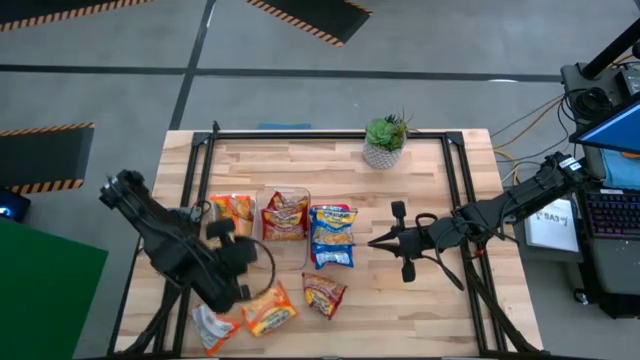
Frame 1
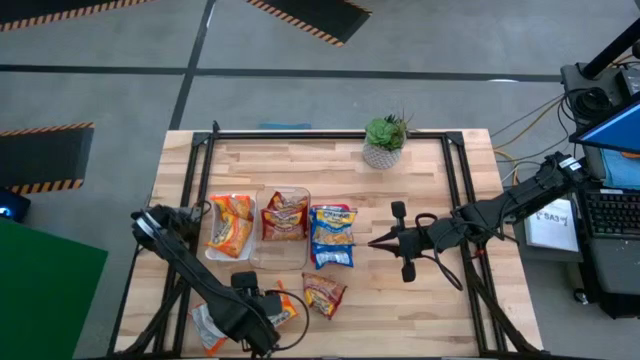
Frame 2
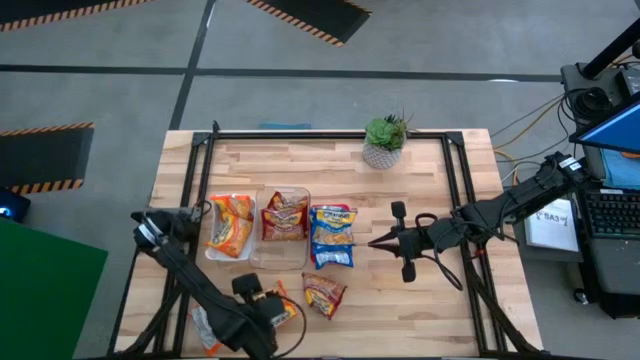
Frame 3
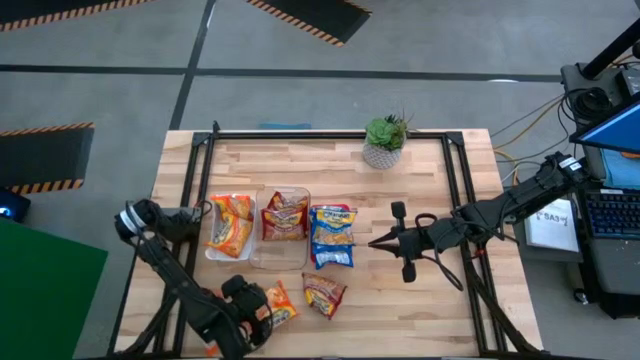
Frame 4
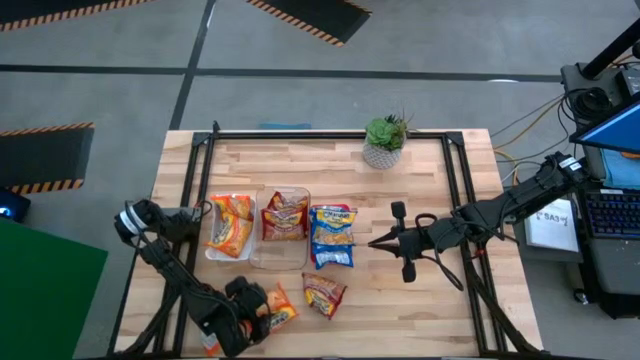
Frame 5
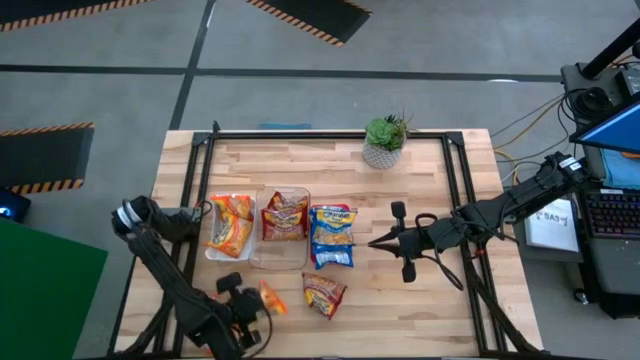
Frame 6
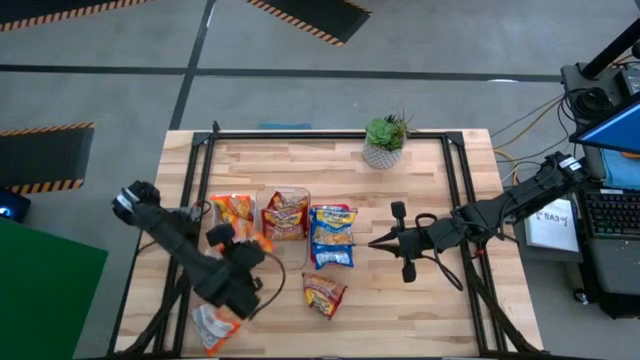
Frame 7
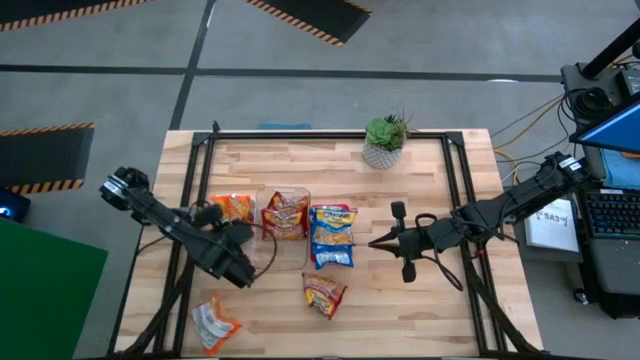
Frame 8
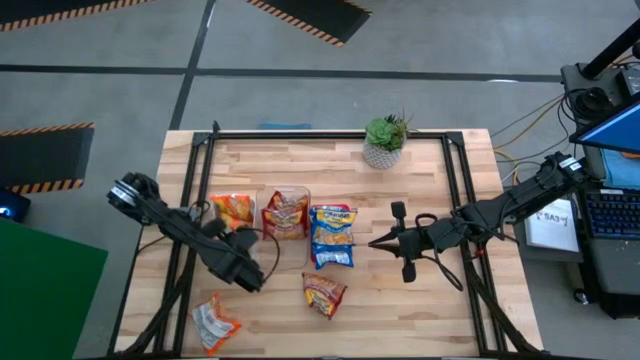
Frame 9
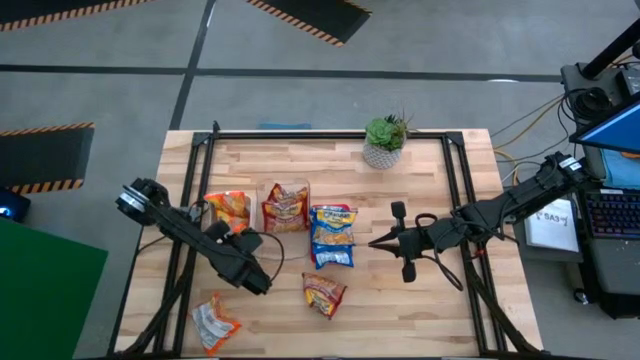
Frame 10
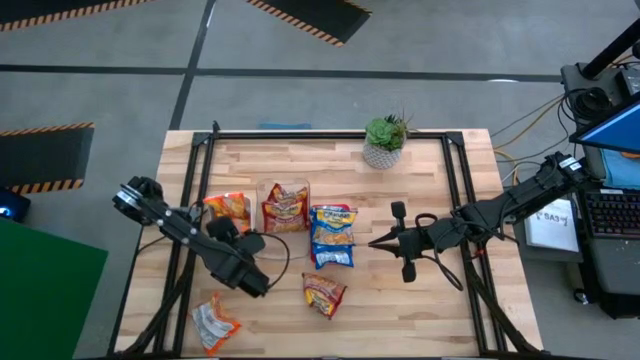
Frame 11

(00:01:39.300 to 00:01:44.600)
Task: Sort Maruchan noodles
Put the orange noodle pack into the white bin

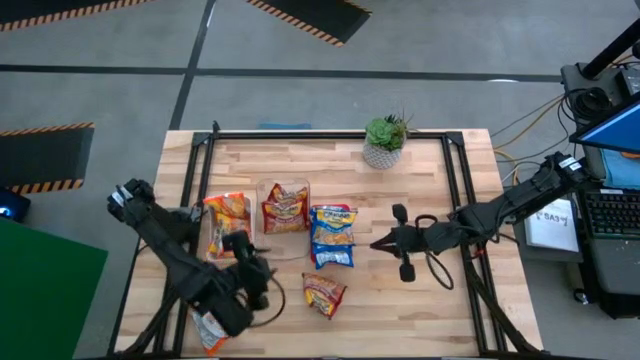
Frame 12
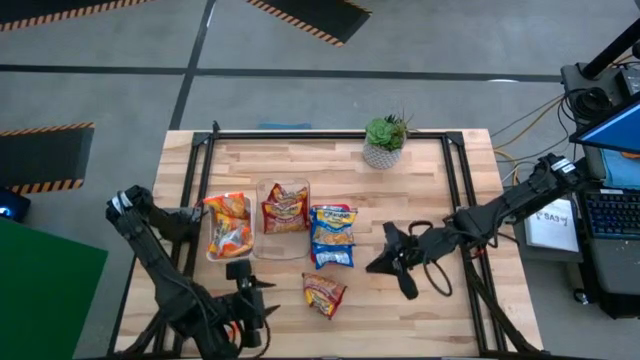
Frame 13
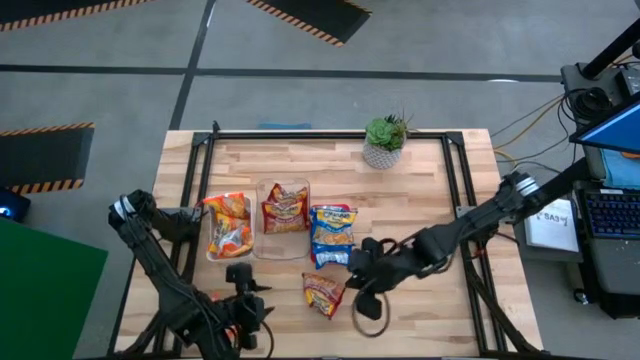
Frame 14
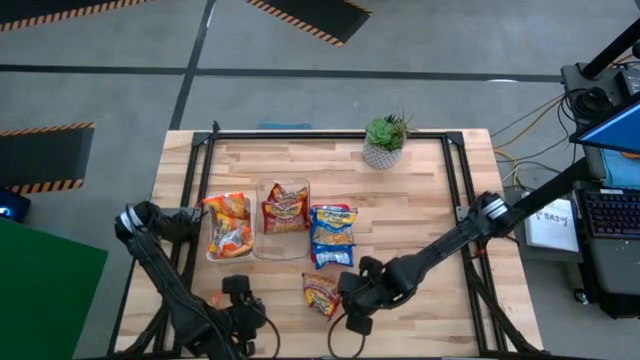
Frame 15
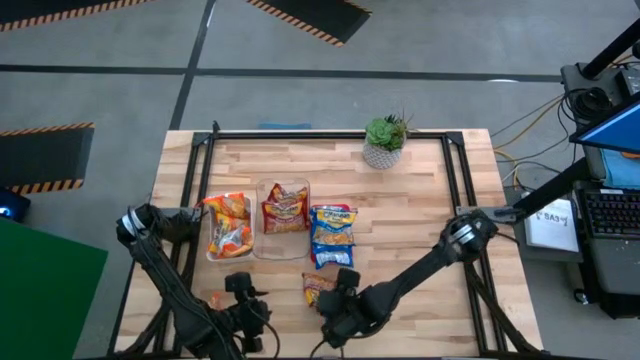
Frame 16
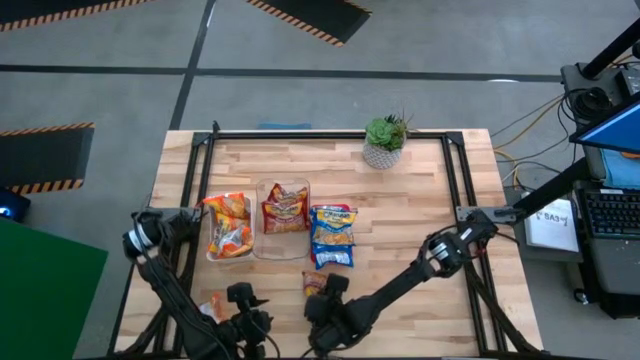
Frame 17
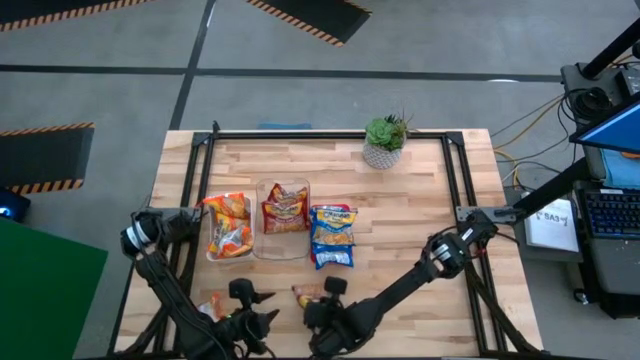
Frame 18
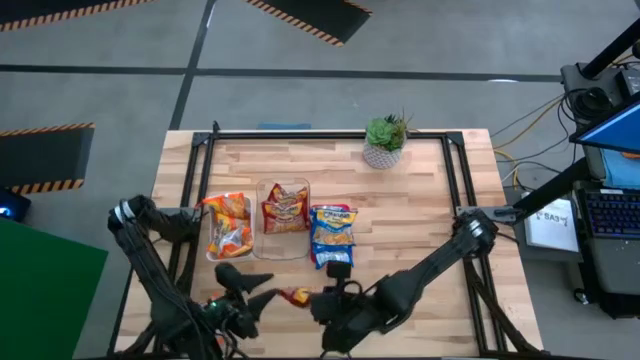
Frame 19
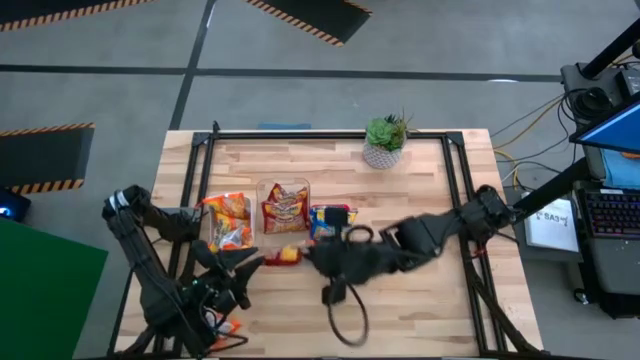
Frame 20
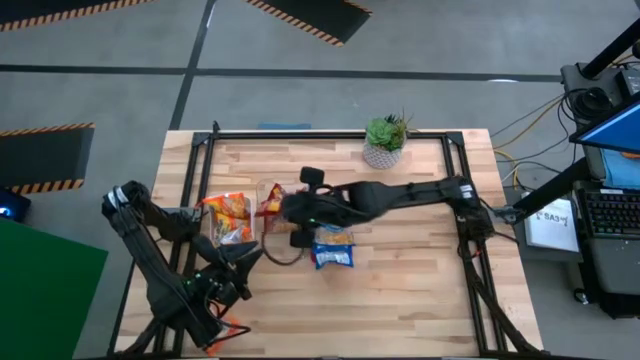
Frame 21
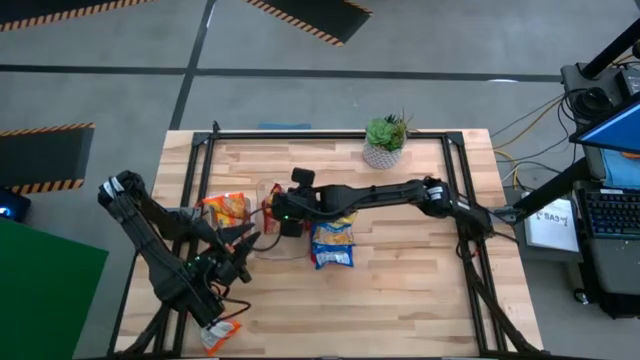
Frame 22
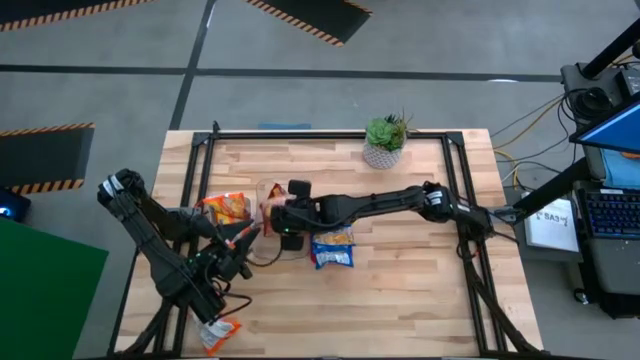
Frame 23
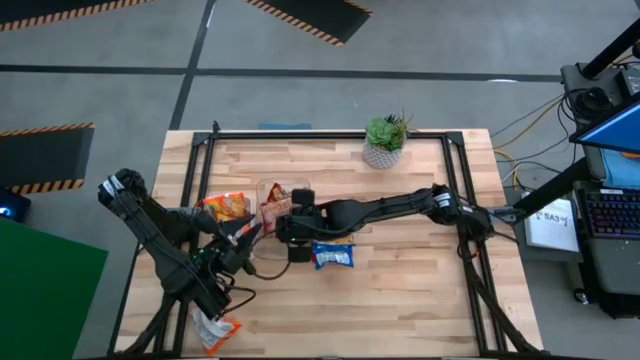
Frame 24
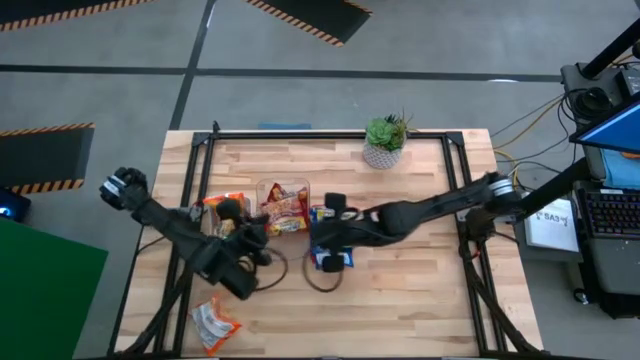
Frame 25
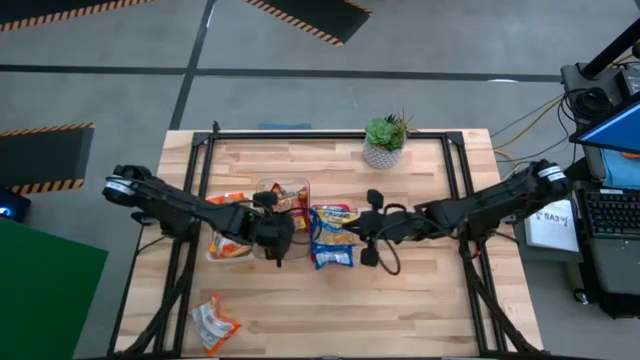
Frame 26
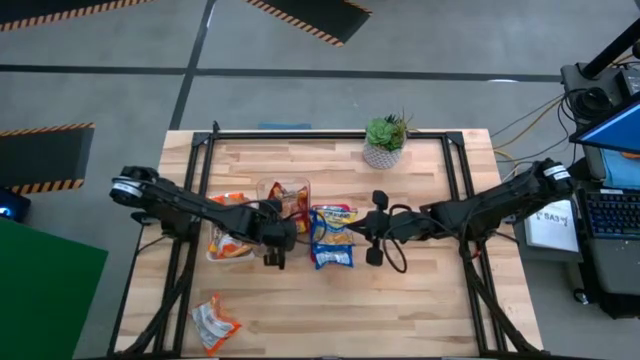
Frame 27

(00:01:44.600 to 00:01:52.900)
Put the red noodle pack into the transparent bin

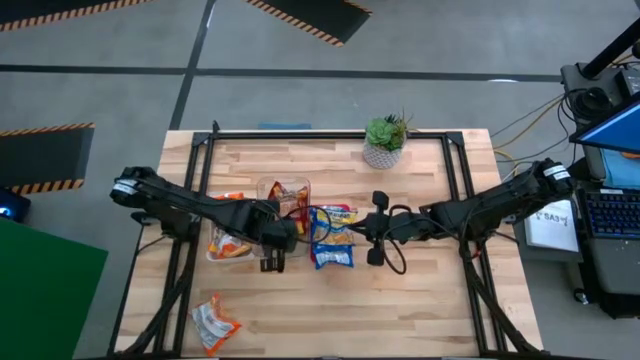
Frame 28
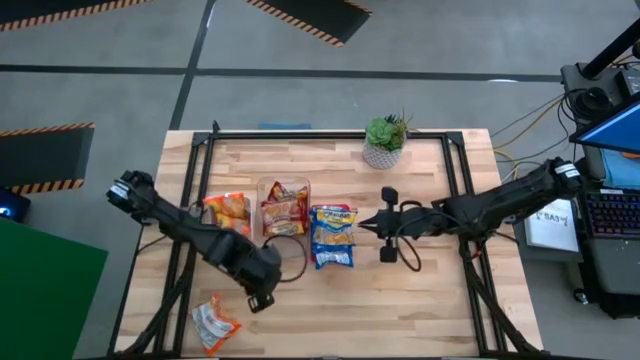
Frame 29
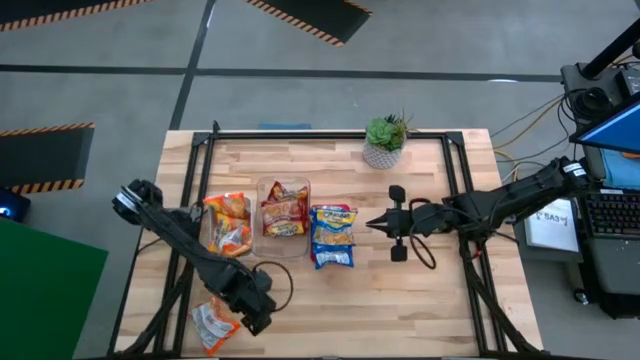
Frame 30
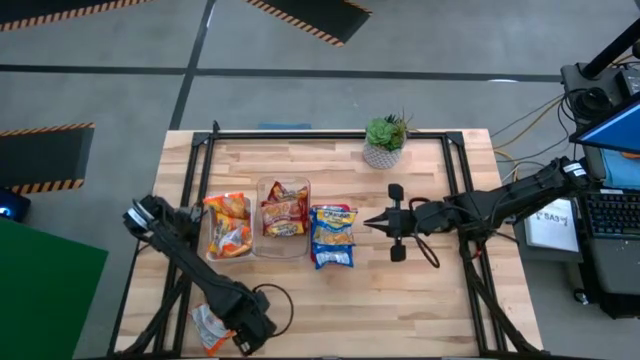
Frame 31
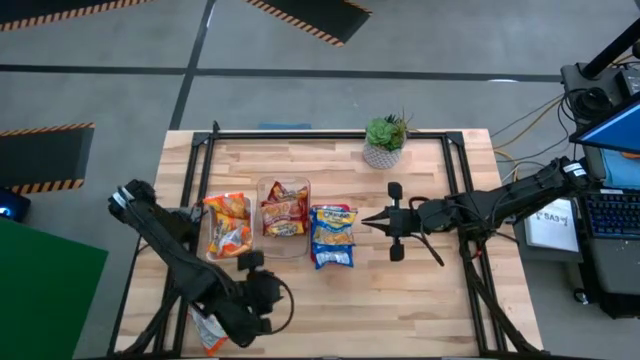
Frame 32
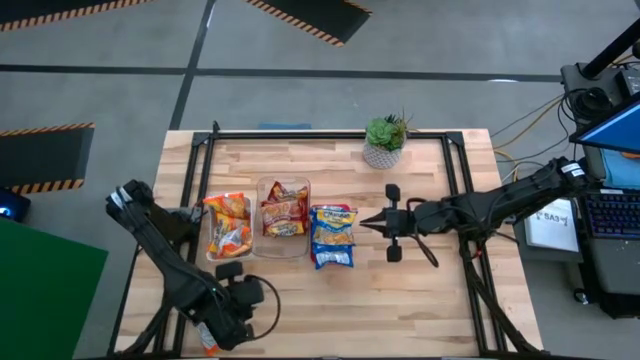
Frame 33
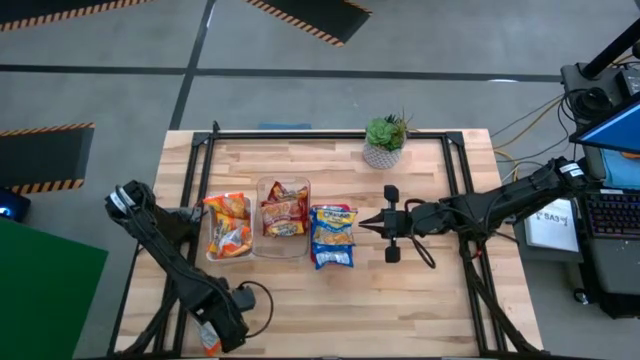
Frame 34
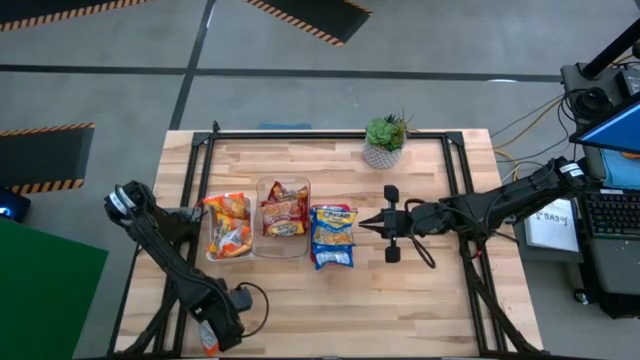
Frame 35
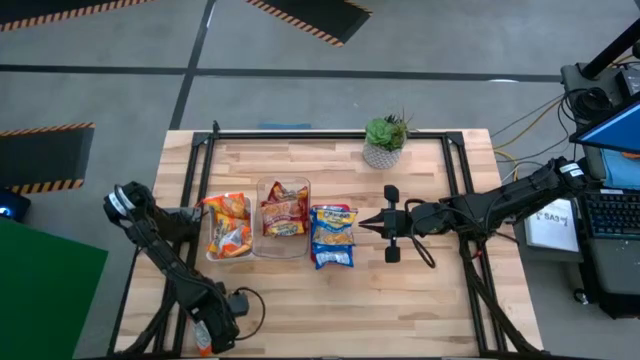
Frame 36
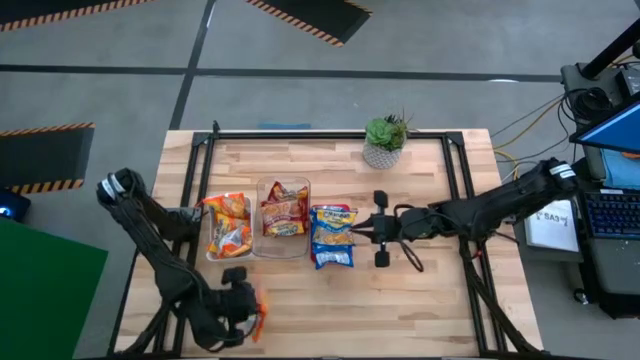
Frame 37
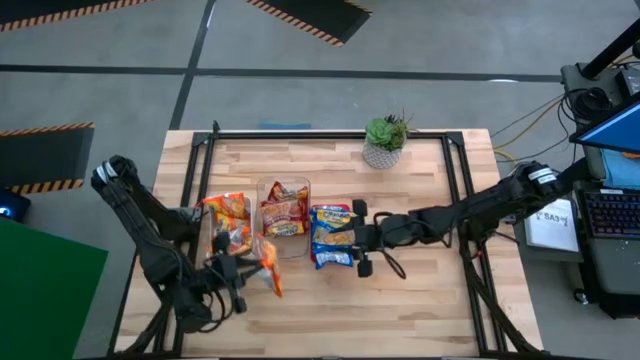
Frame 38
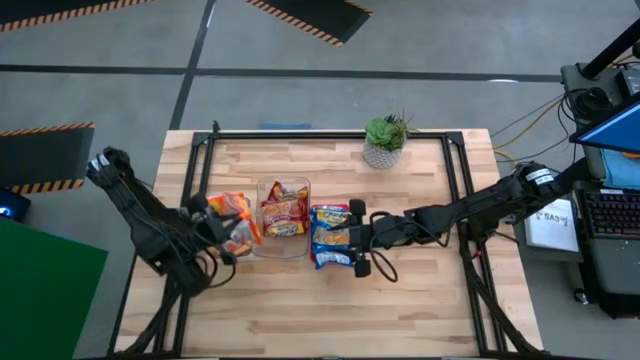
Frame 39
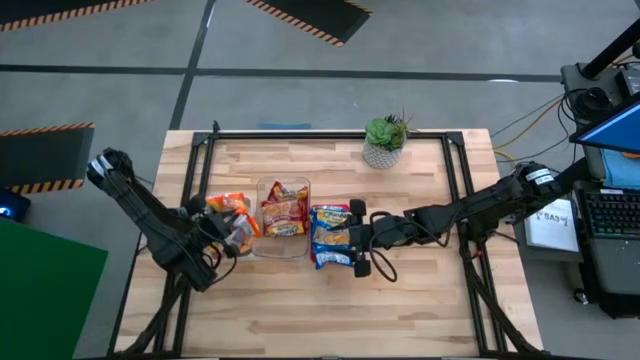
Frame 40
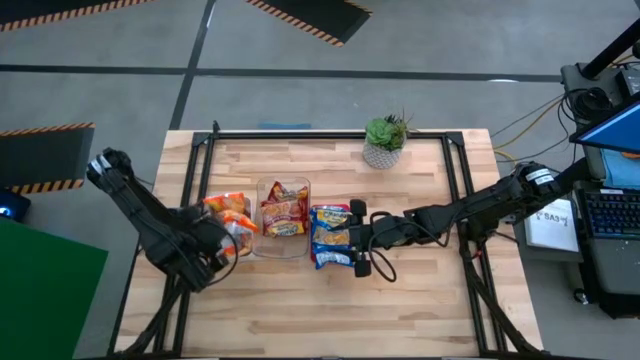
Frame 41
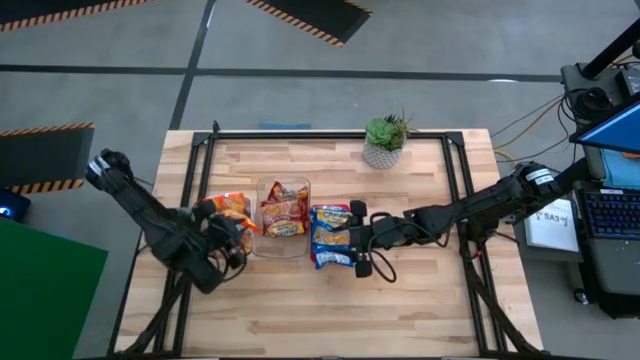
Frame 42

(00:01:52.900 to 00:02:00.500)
Put the orange noodle pack into the white bin
